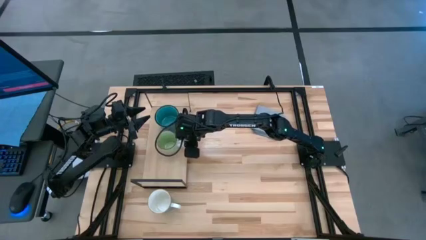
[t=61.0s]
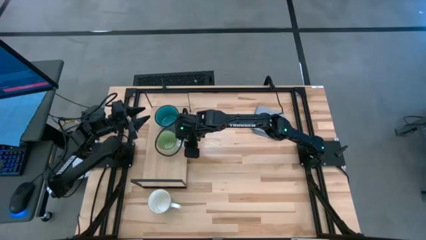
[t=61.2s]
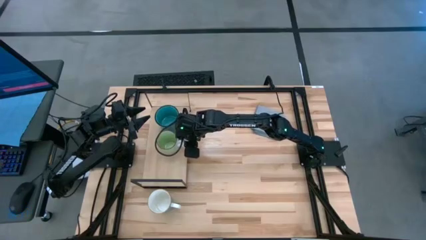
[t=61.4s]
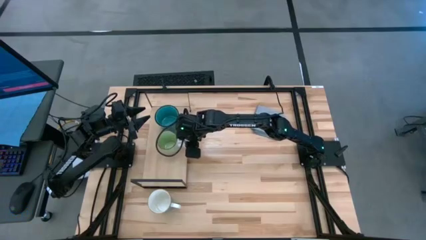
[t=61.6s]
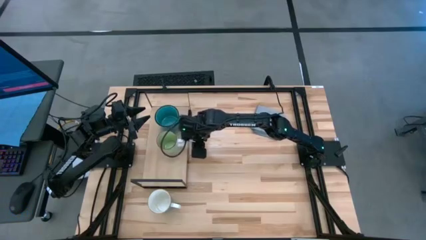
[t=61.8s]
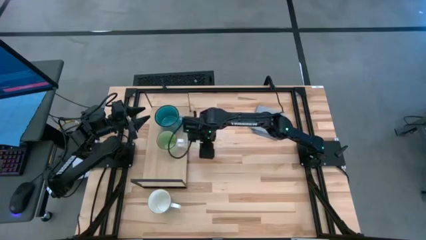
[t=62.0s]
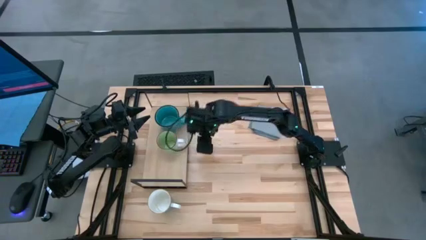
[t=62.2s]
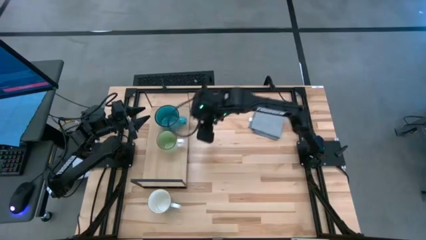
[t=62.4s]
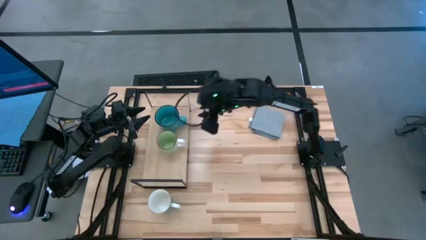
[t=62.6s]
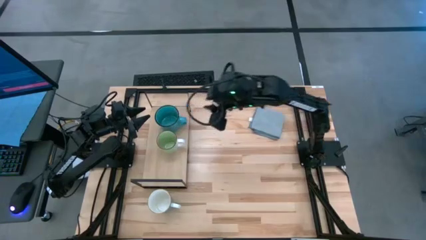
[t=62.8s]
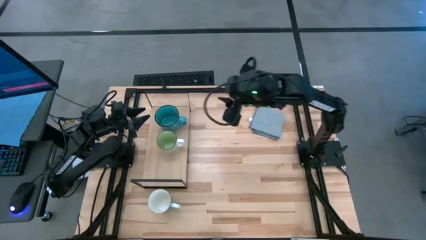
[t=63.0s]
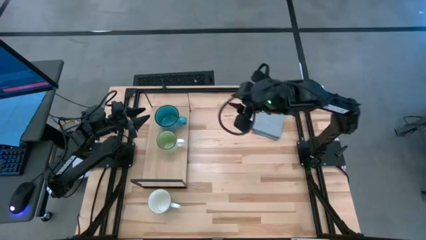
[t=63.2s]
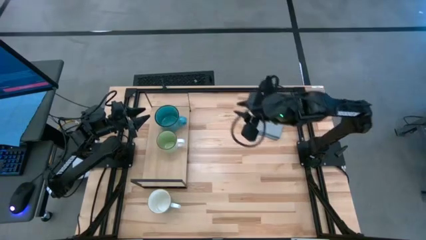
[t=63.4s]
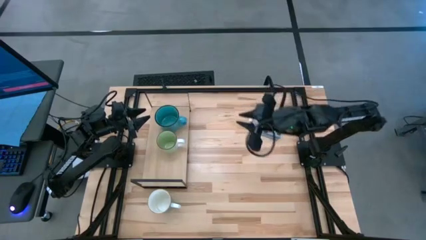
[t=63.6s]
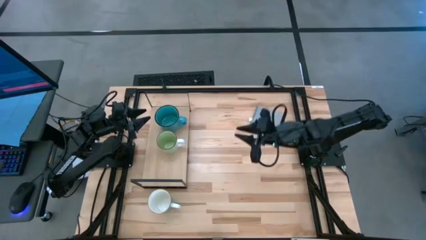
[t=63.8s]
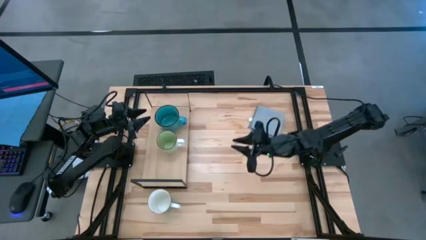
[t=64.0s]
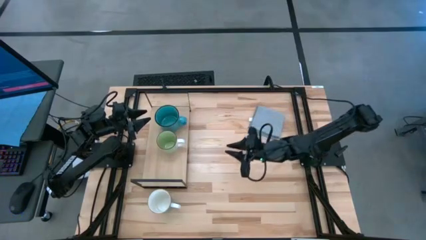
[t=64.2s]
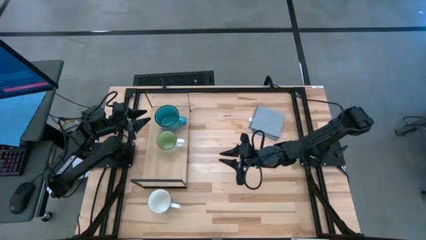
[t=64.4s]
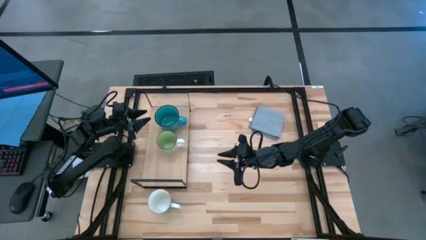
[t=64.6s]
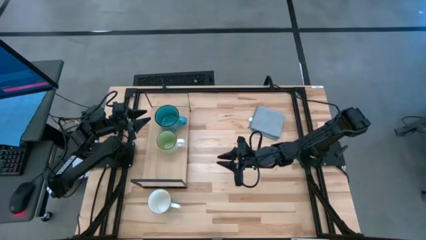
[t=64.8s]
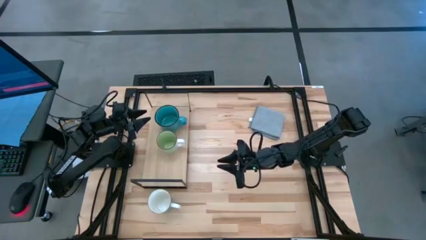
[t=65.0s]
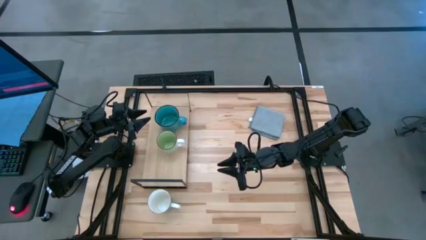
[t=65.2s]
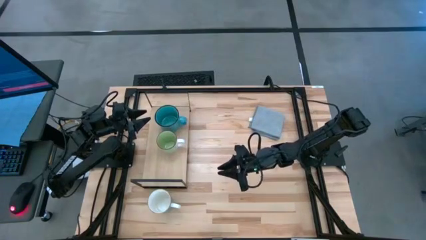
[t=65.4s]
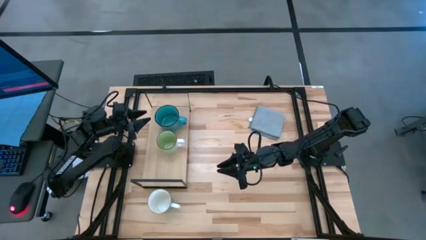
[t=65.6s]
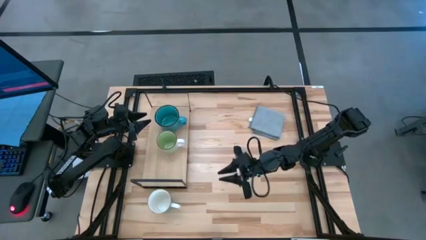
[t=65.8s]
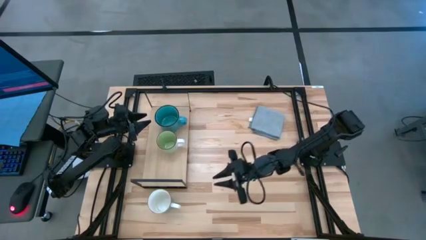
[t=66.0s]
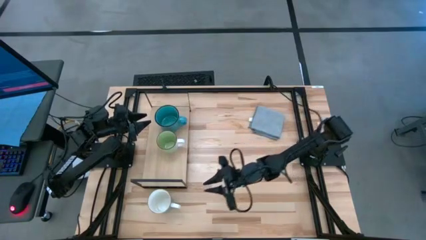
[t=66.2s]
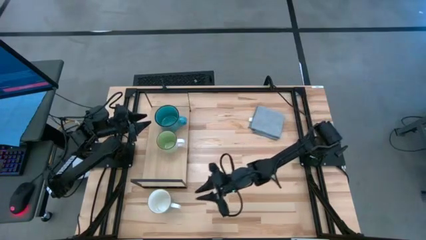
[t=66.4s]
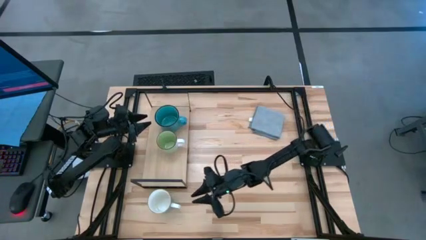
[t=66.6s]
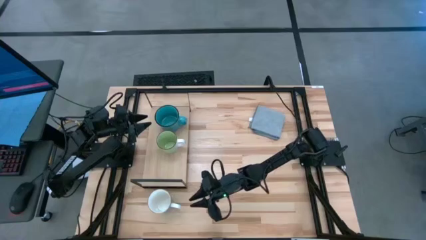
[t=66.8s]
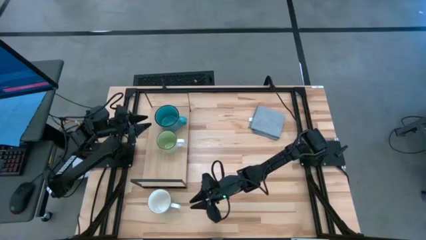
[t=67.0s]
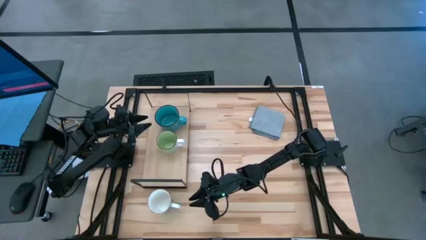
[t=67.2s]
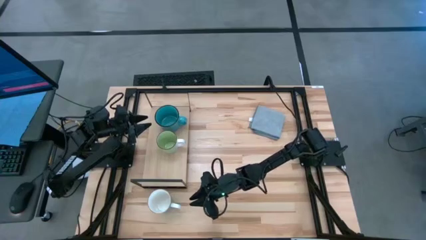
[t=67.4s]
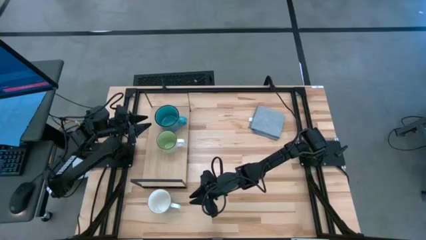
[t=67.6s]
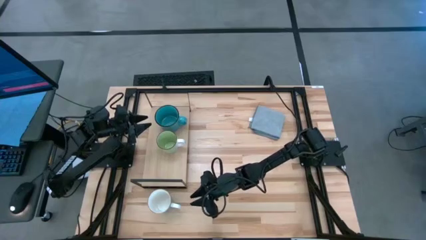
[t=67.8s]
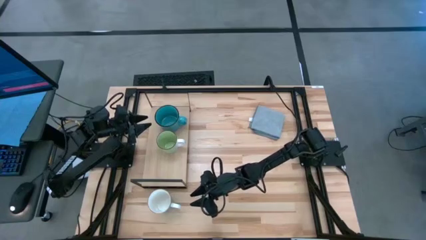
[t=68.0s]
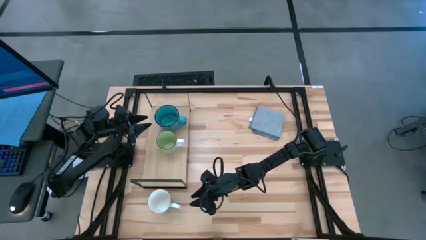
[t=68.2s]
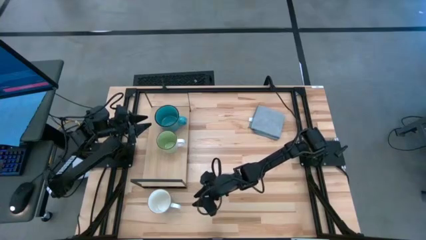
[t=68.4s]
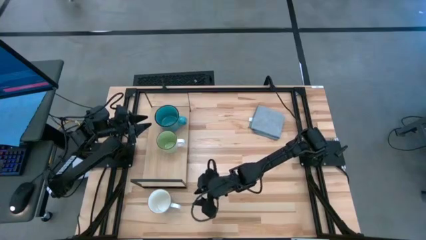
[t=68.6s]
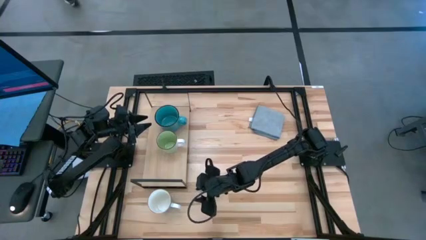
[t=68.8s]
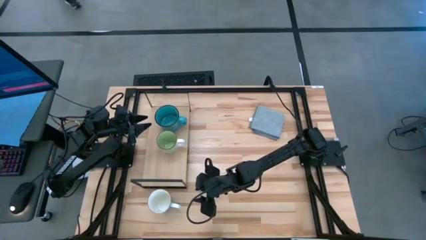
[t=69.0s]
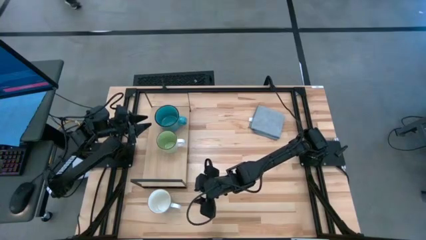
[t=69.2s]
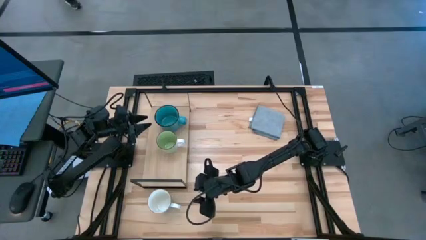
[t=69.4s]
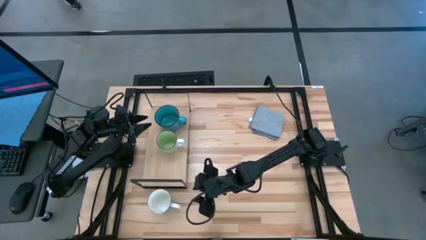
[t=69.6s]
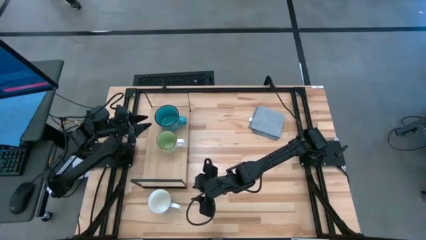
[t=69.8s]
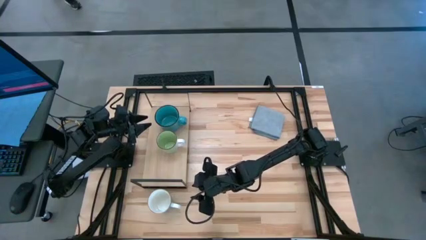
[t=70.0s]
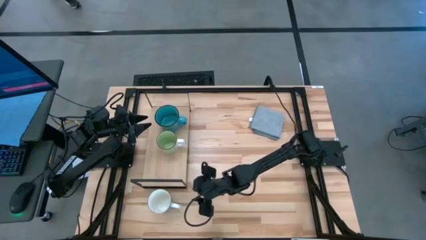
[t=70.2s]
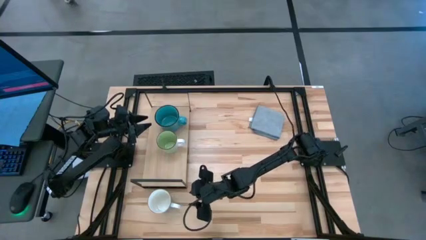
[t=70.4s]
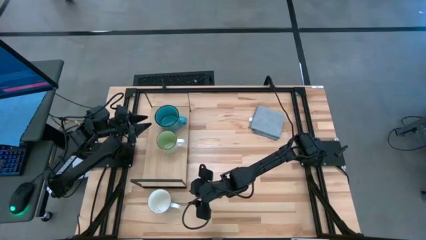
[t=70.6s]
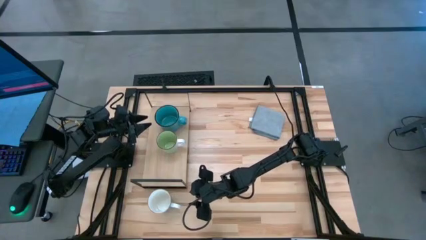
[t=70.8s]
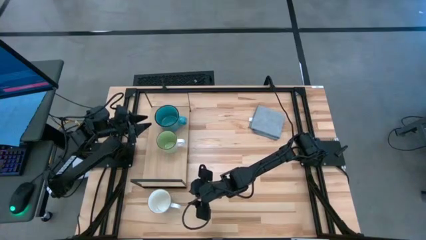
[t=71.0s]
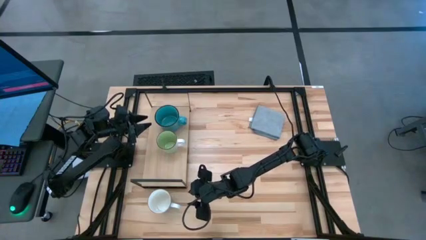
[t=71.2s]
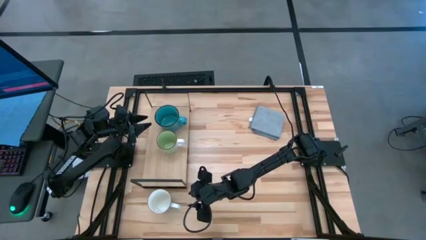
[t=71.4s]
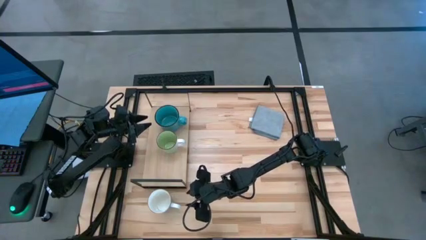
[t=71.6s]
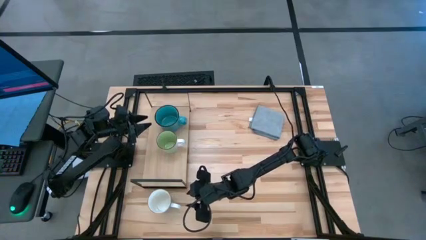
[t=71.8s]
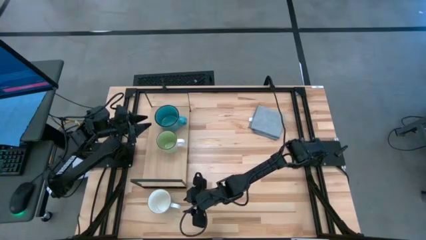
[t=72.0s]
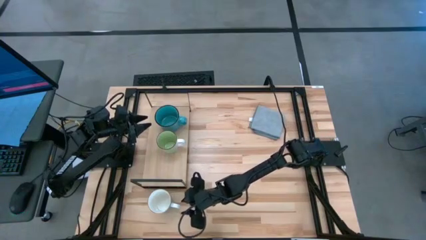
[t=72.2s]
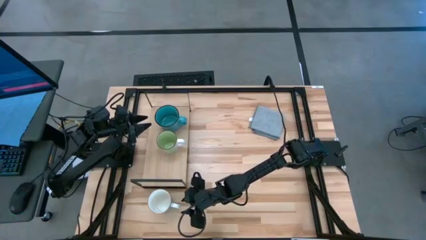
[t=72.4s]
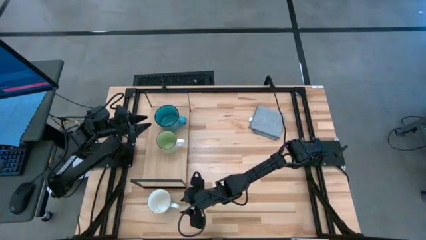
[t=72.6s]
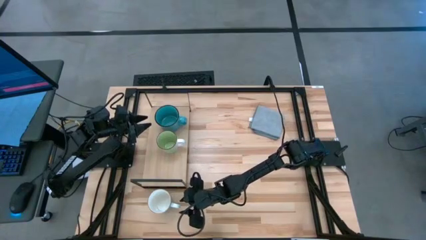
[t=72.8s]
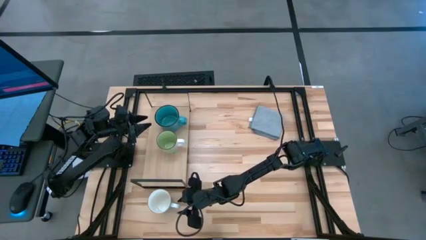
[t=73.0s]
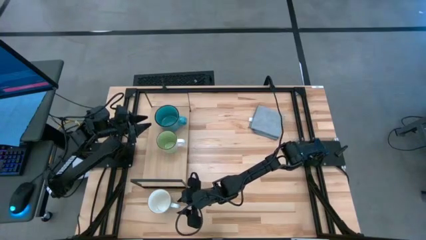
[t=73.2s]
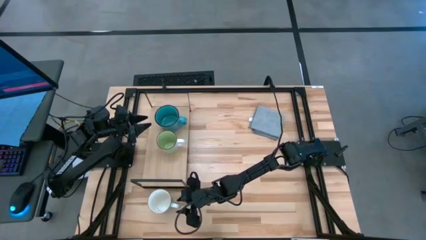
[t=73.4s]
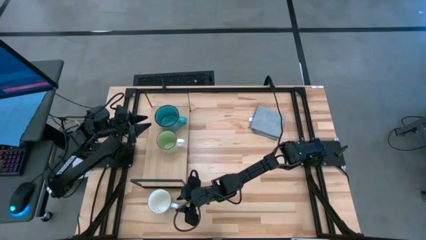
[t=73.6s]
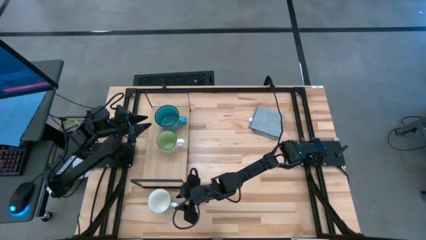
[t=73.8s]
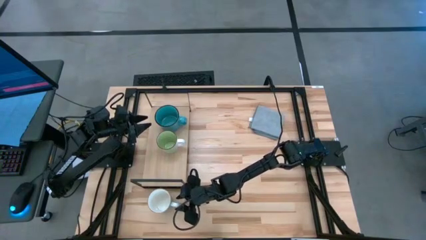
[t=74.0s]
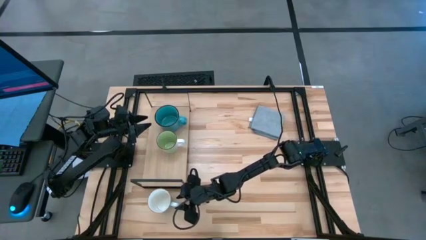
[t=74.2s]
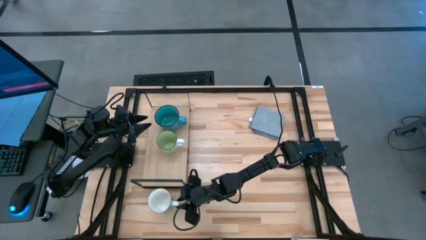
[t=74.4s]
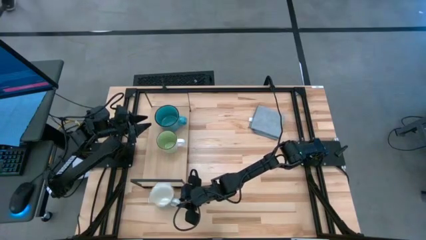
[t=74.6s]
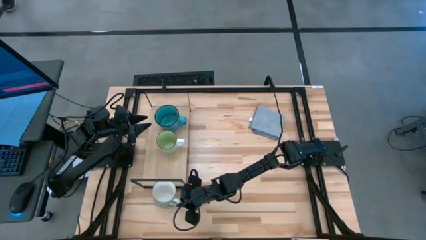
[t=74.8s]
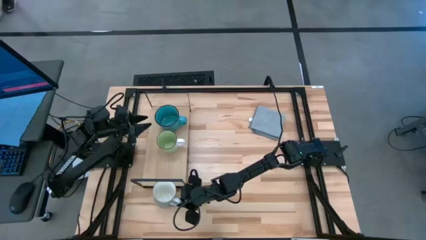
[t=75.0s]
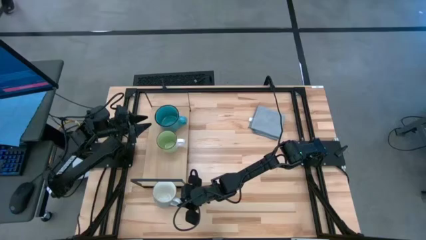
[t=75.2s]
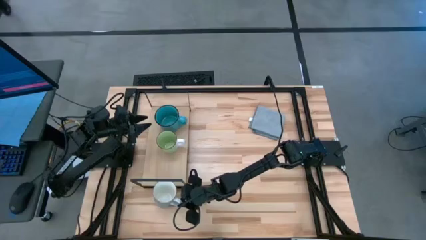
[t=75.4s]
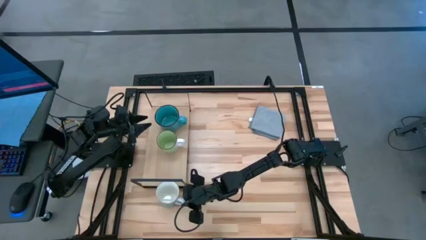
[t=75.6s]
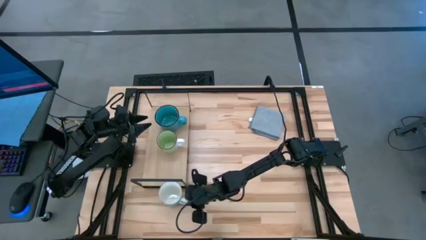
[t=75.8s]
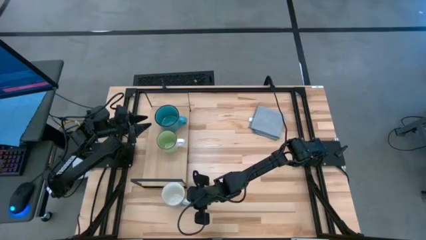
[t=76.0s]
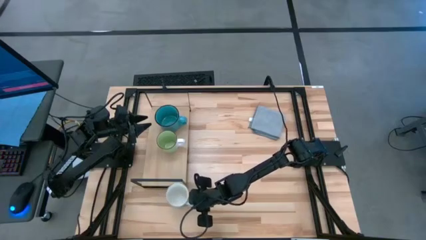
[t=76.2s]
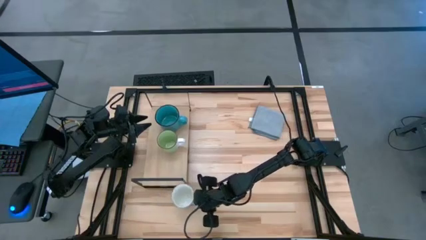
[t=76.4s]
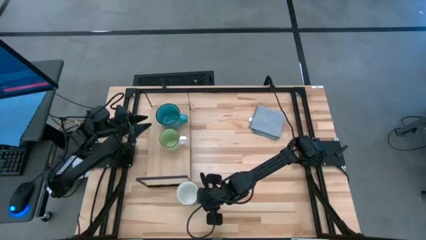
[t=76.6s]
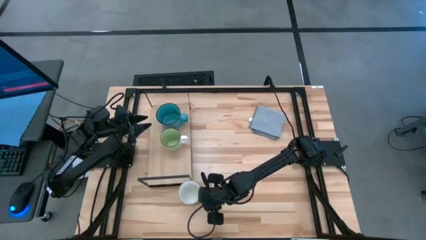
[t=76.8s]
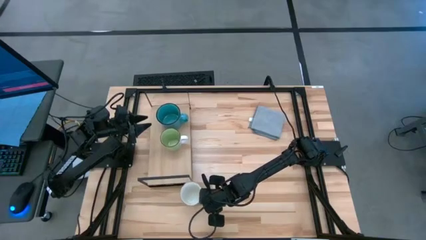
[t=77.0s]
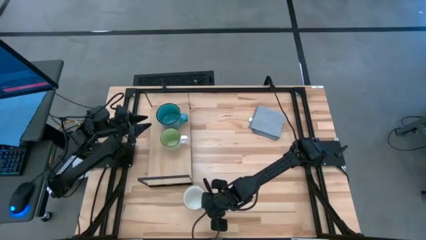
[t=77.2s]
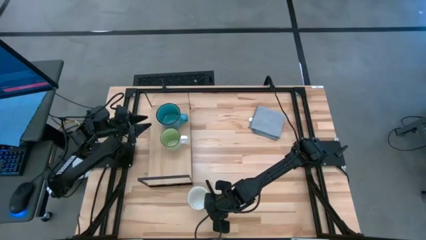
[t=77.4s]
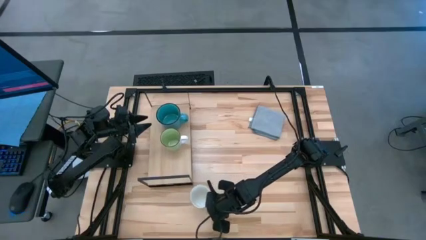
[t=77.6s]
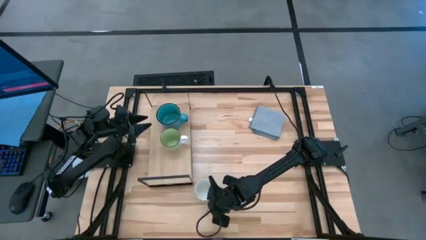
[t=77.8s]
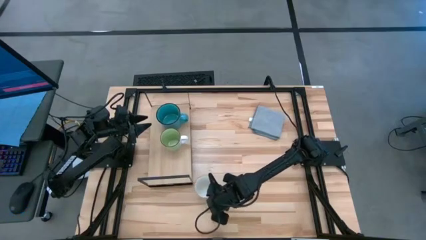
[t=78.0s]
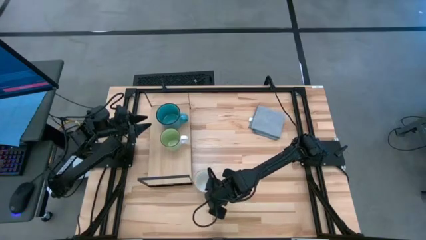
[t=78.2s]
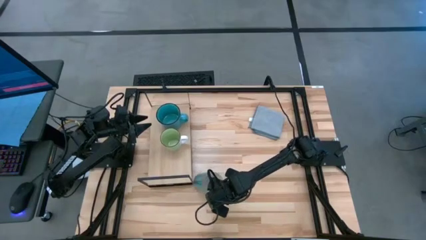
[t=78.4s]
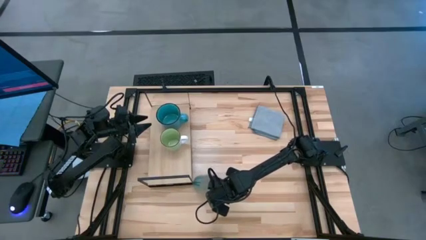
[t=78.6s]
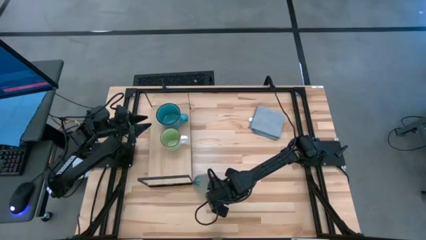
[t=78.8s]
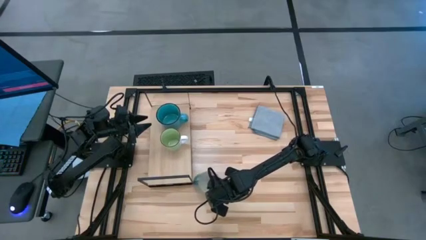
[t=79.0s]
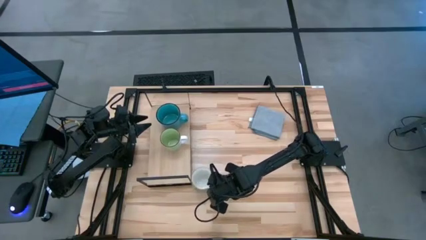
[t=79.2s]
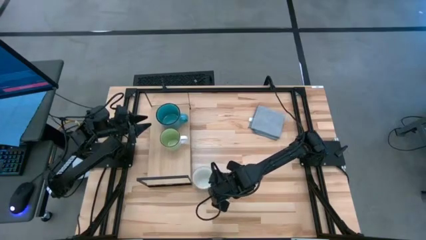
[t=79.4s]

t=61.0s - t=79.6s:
Task: Stack small to large cups/mugs on shelf
Put the white mug on the shelf
